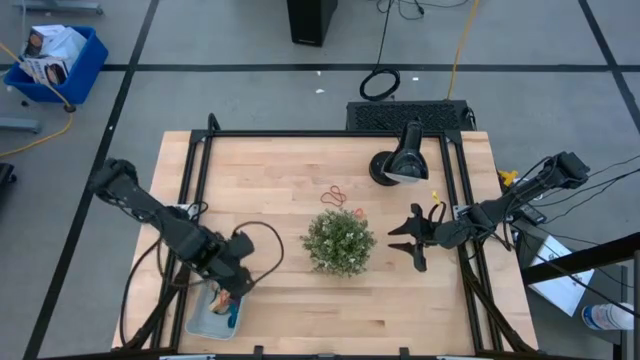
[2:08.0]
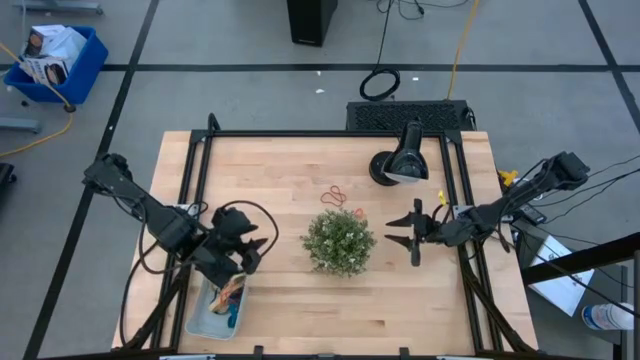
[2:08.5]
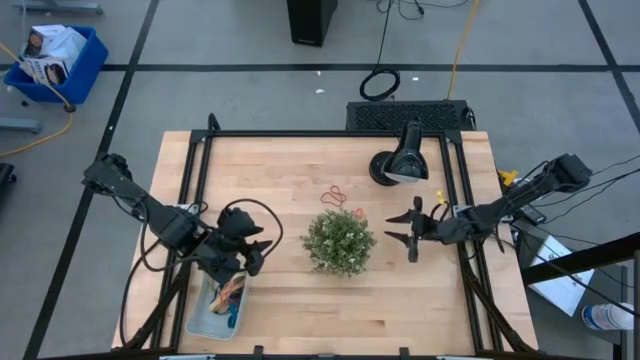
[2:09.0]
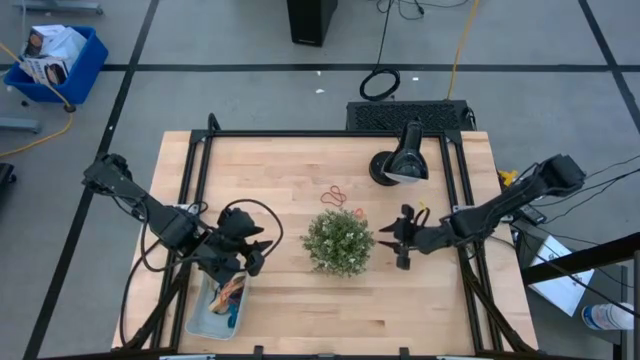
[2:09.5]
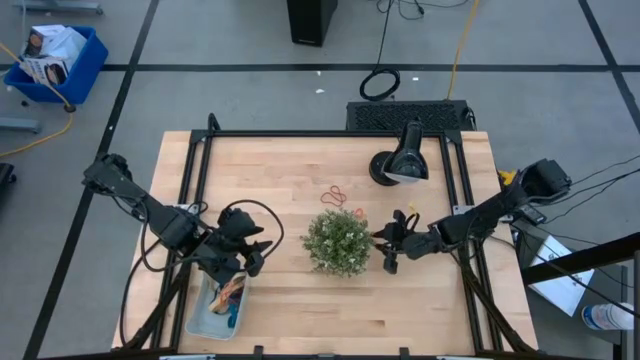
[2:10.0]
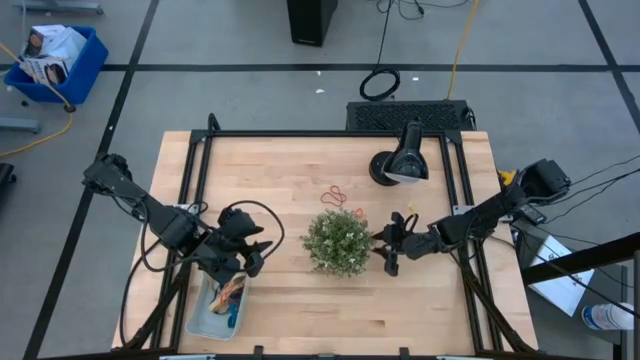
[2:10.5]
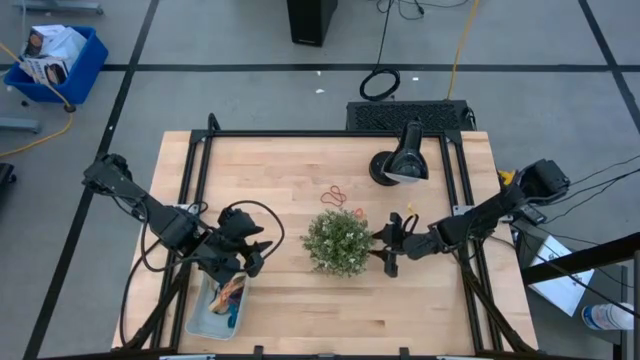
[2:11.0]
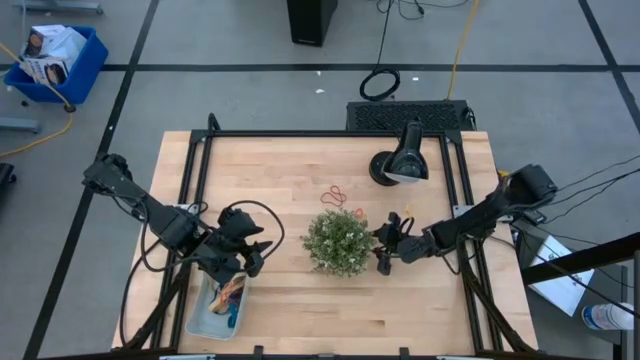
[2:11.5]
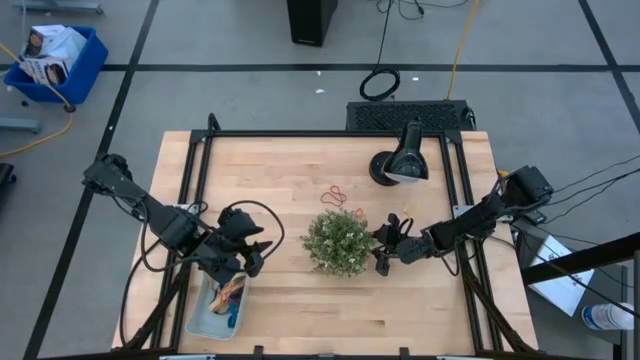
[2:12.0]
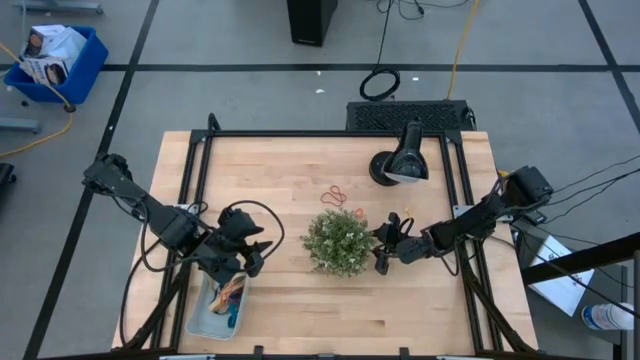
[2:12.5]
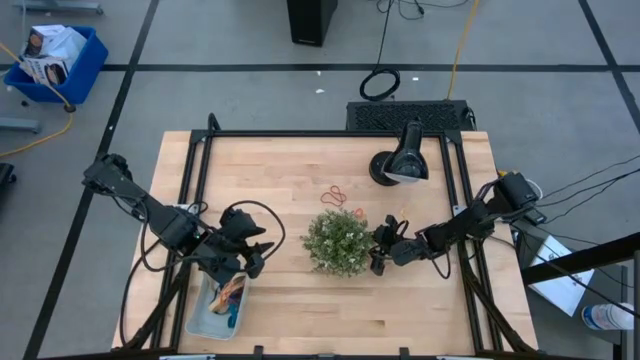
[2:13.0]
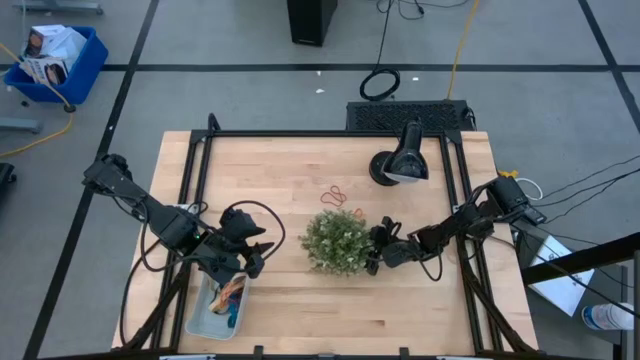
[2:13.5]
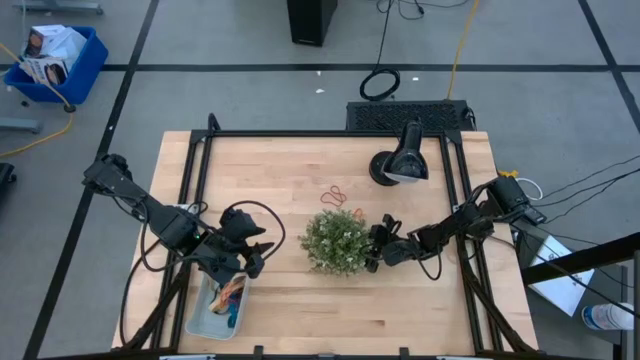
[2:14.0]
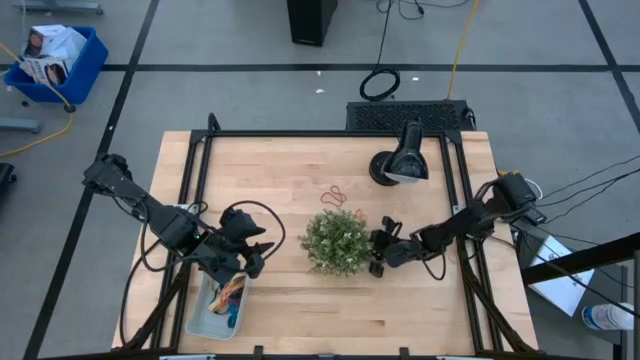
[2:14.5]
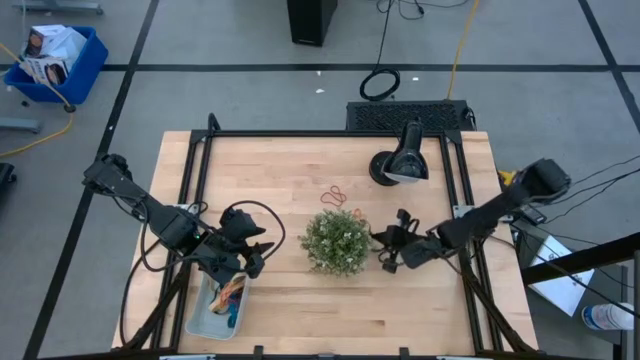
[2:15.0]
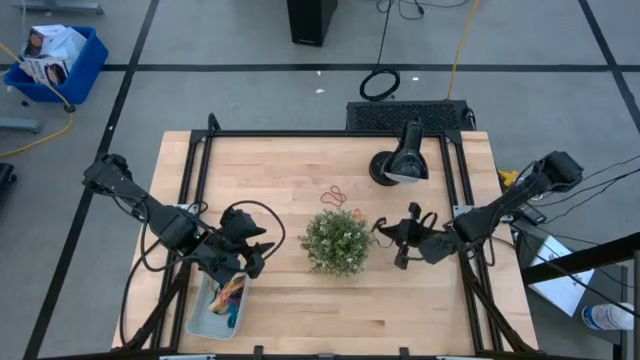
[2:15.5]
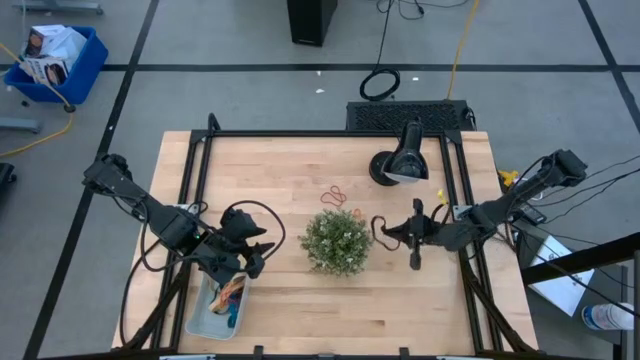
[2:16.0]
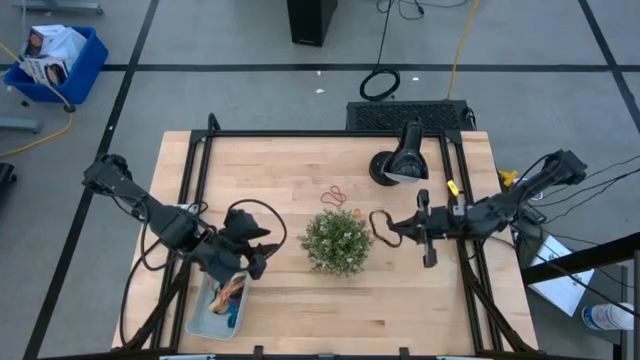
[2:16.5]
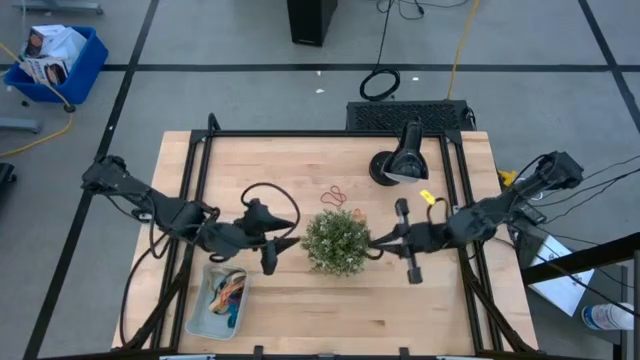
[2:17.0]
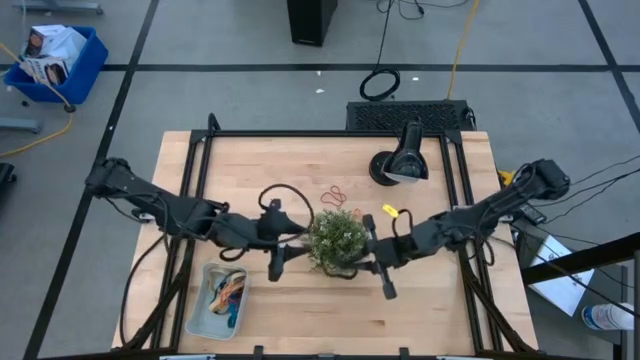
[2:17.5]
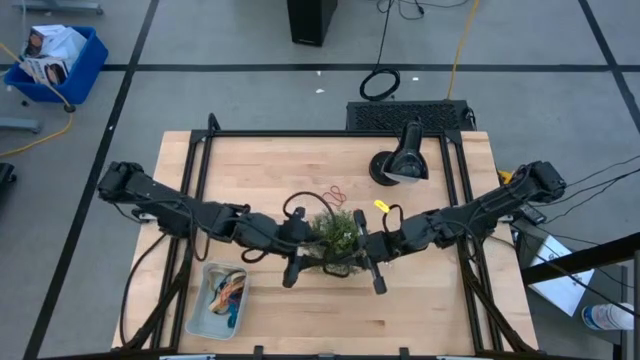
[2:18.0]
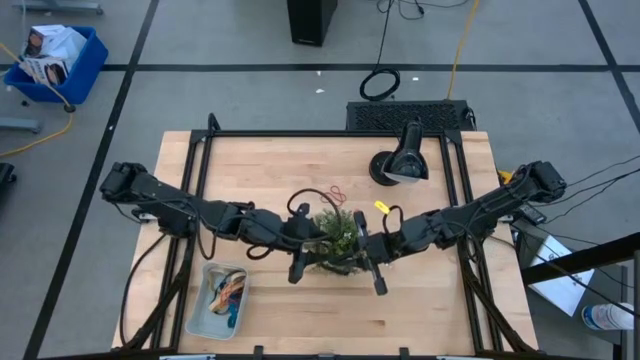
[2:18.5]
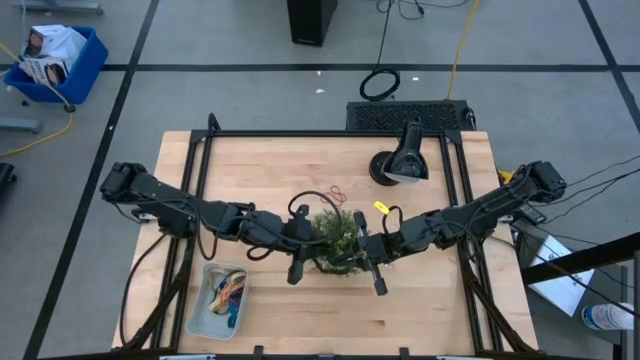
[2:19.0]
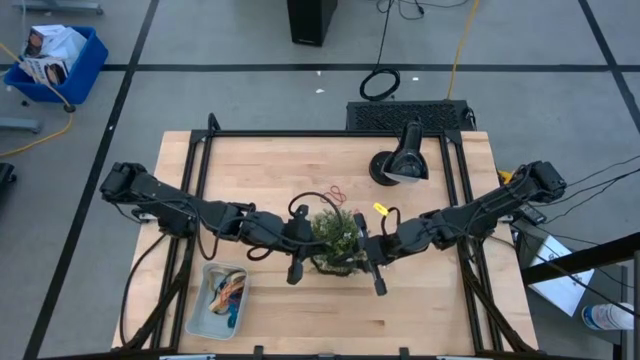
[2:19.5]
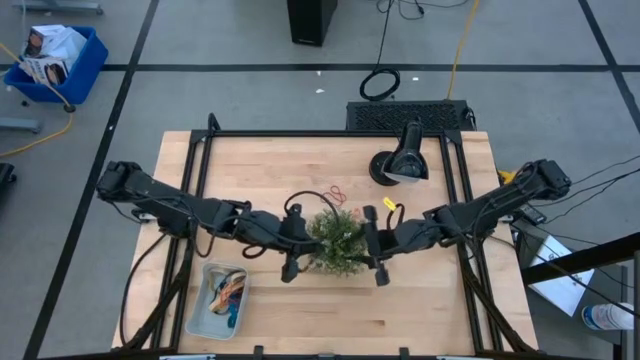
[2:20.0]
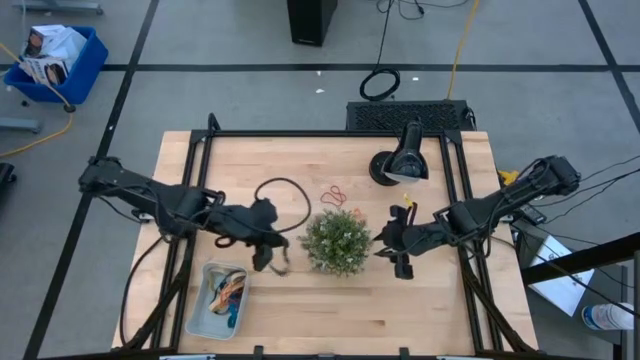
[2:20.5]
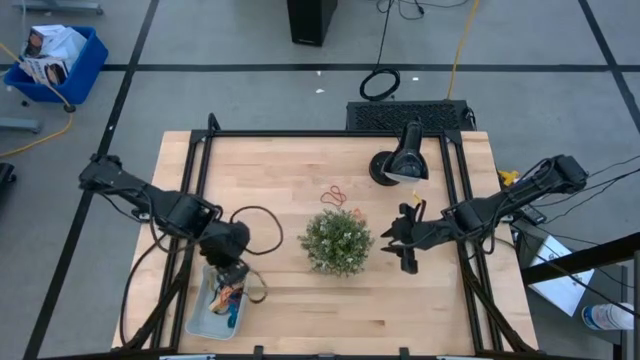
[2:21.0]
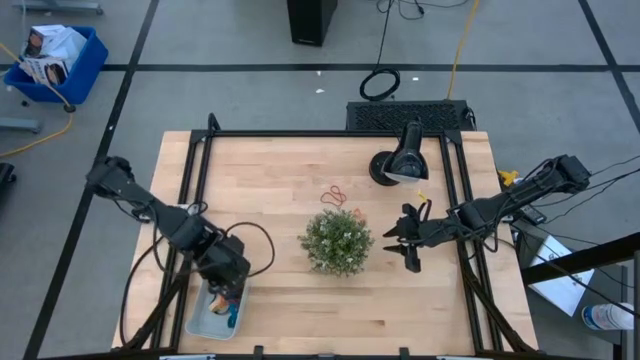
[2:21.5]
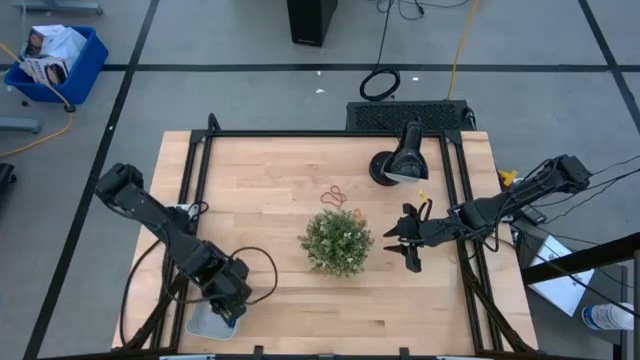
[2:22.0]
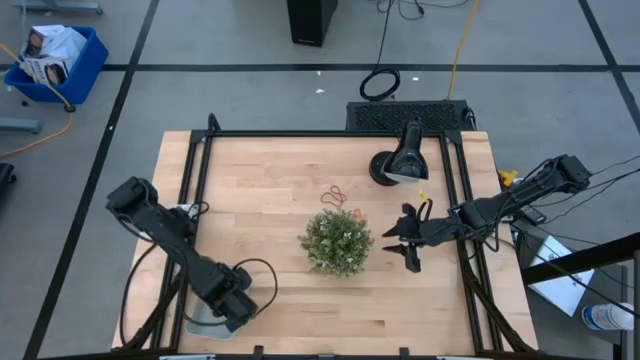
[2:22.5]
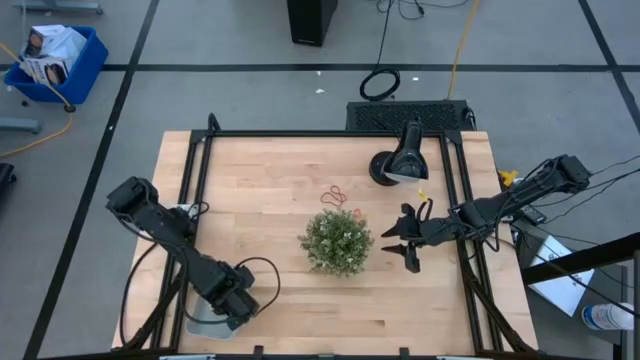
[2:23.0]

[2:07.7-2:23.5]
Task: Pick and place rubber bands into bin
Put the black rubber band into the blue bin

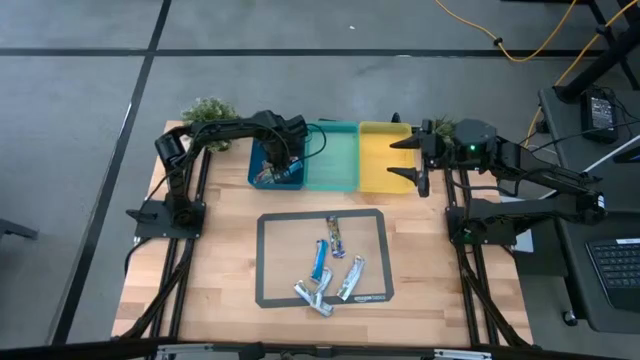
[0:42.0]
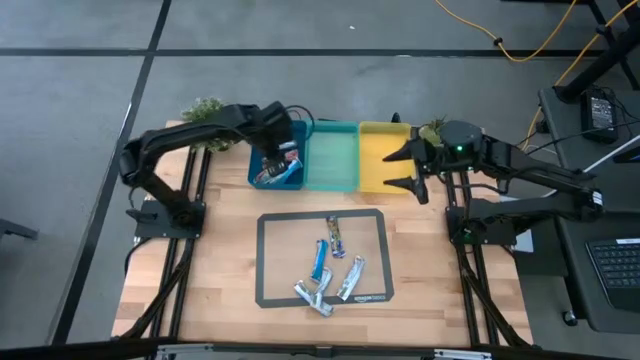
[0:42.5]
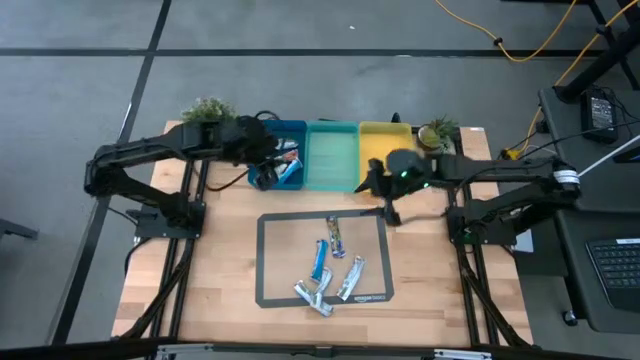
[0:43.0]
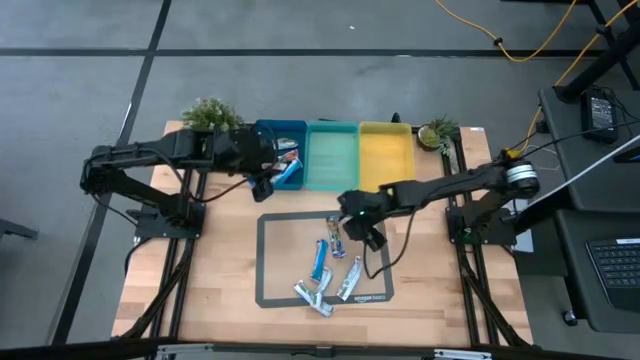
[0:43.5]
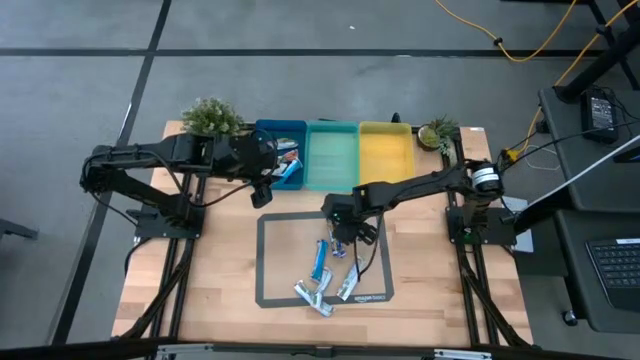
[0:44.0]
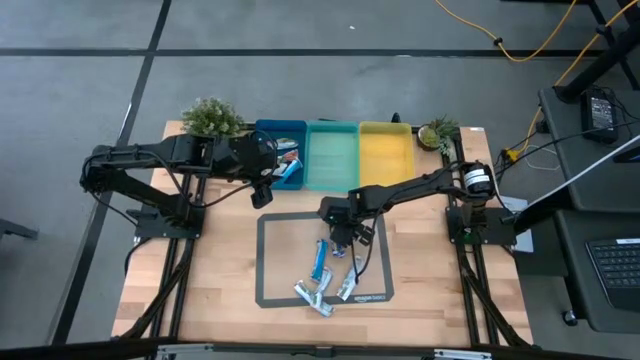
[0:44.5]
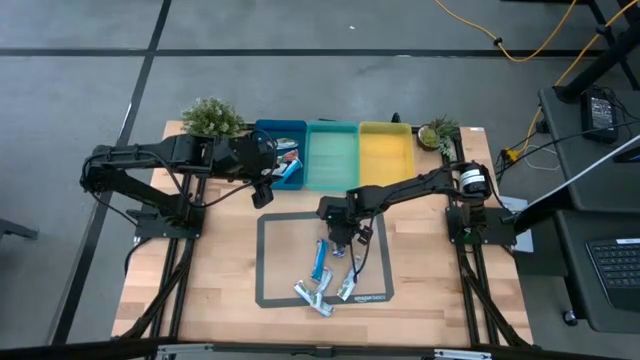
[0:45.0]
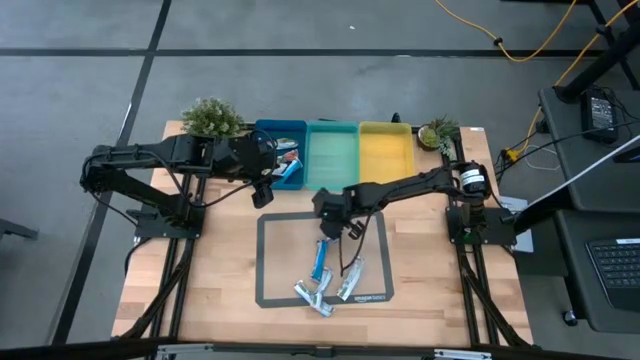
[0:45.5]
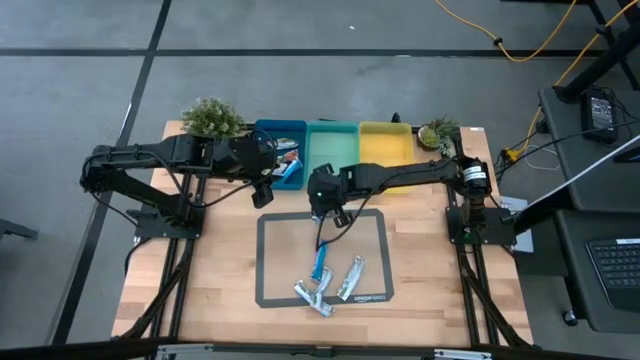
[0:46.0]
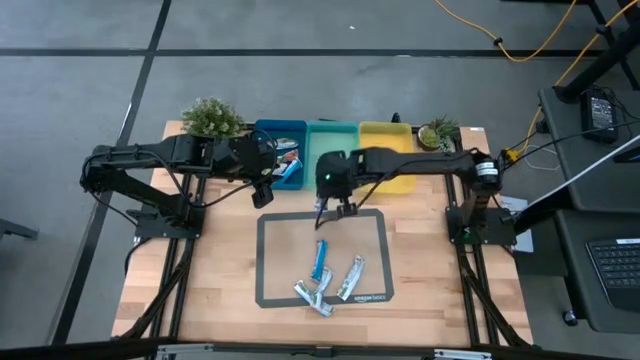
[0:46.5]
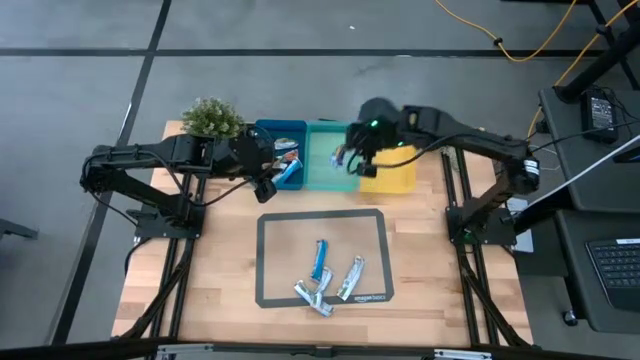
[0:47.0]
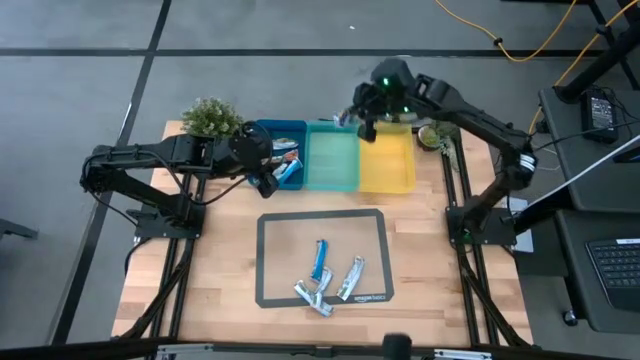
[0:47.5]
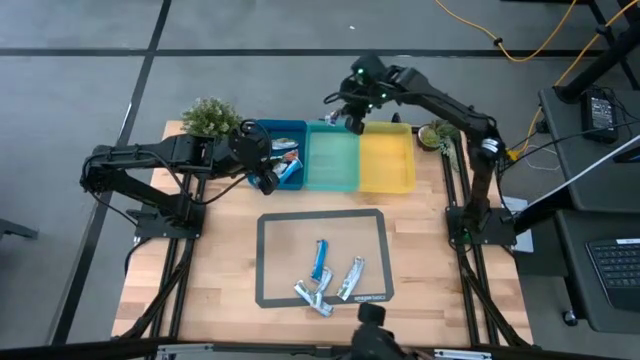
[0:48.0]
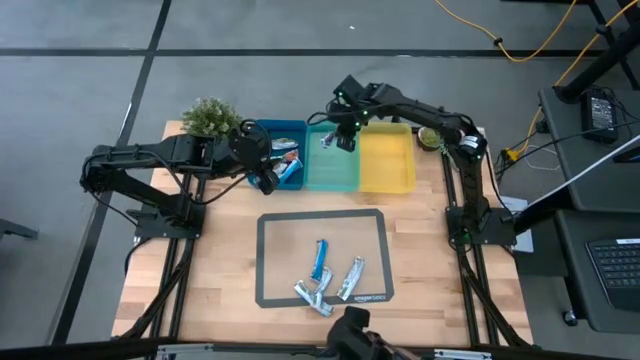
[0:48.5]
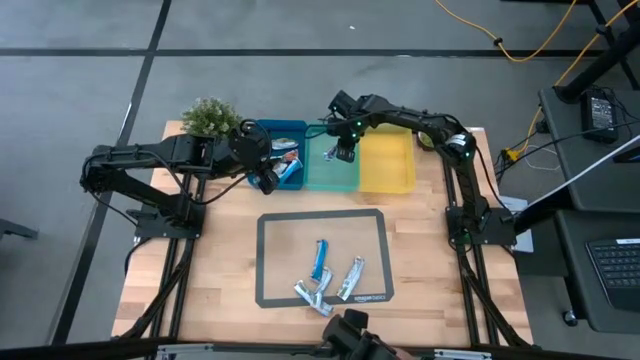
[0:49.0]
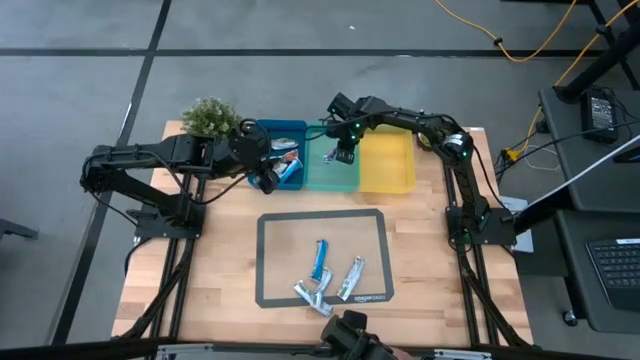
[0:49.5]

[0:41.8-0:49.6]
Task: Pick and place Granola Bars by type
Put the left blue granola bar into the green bin
